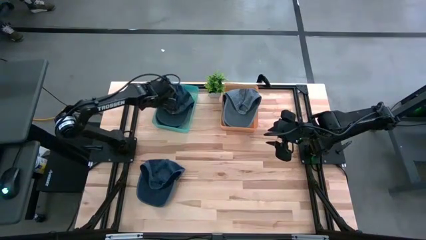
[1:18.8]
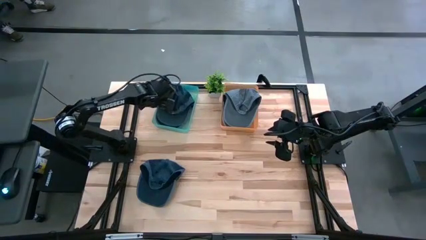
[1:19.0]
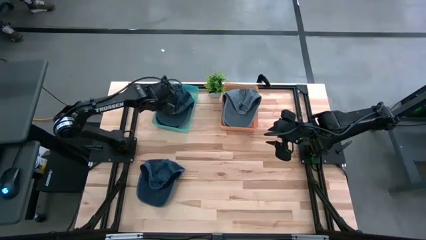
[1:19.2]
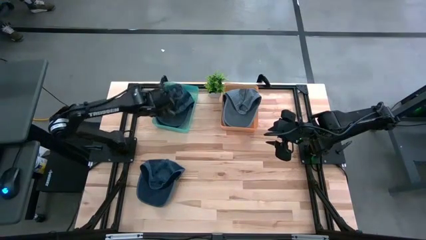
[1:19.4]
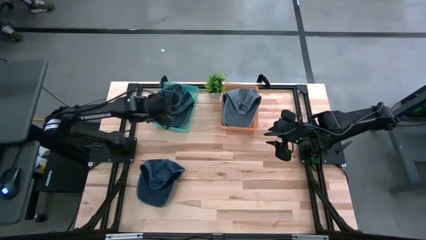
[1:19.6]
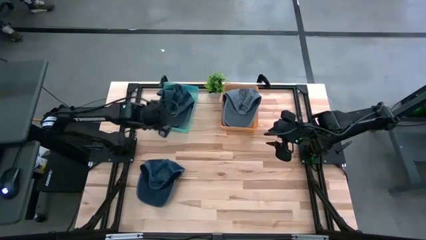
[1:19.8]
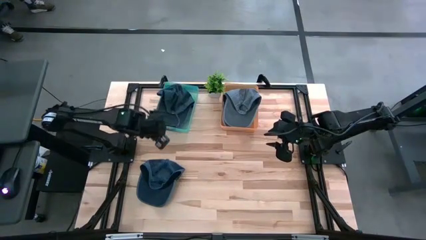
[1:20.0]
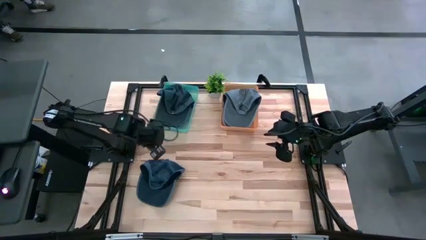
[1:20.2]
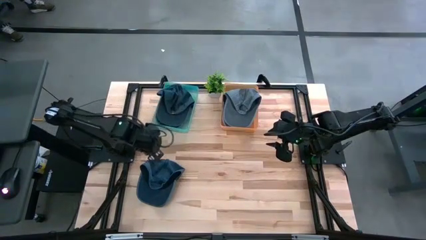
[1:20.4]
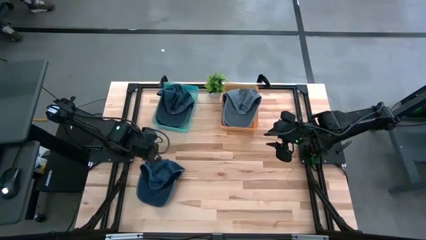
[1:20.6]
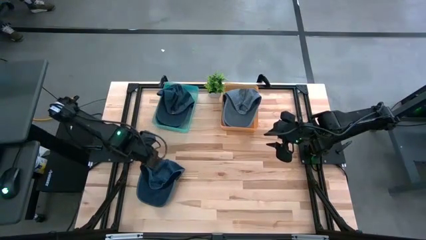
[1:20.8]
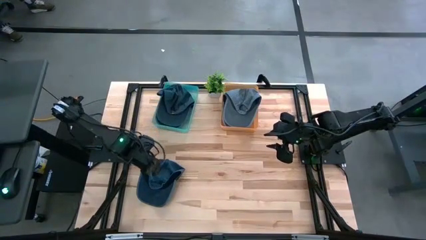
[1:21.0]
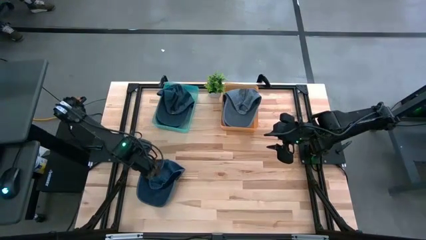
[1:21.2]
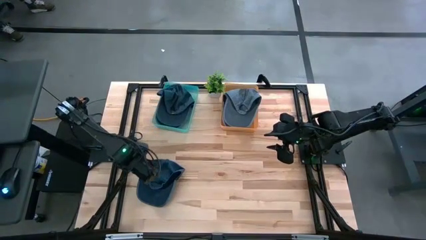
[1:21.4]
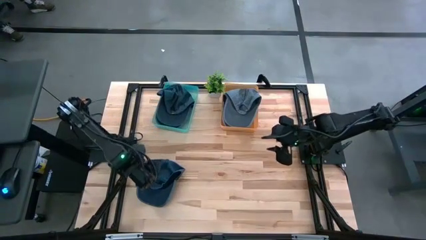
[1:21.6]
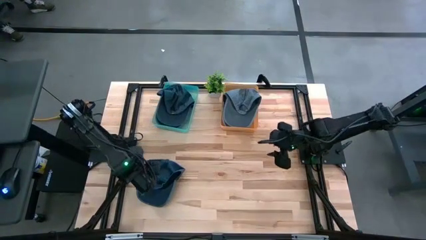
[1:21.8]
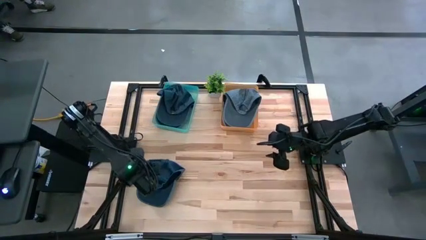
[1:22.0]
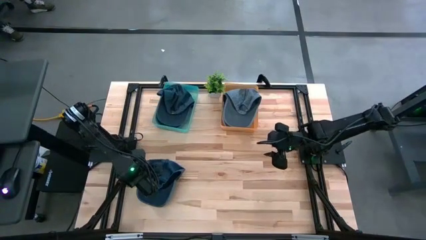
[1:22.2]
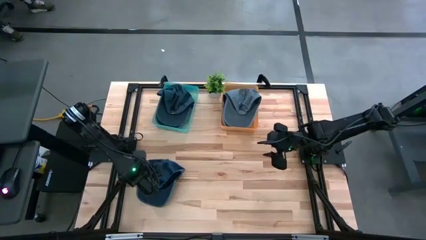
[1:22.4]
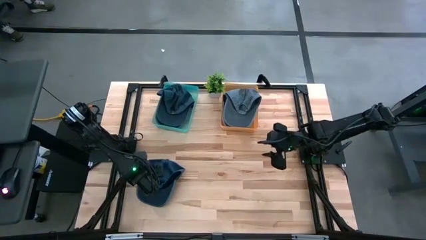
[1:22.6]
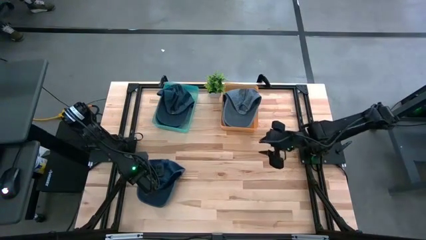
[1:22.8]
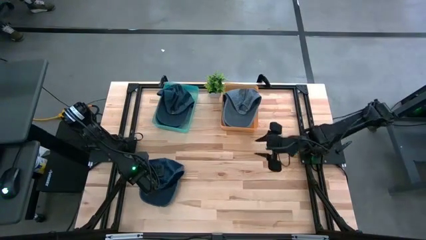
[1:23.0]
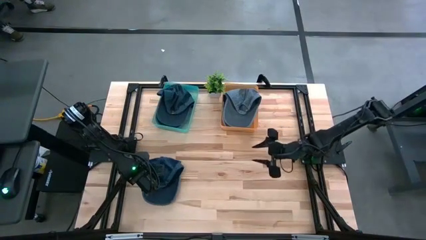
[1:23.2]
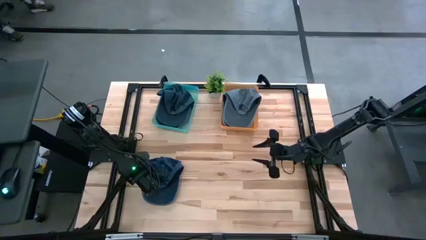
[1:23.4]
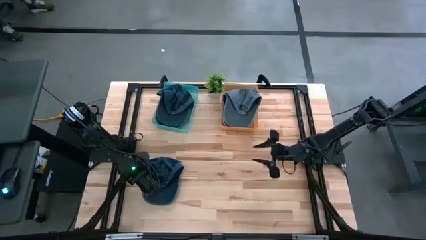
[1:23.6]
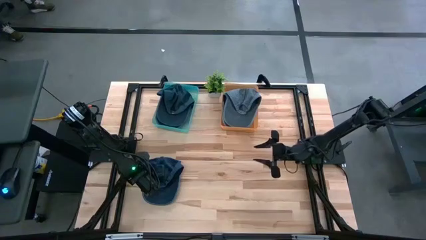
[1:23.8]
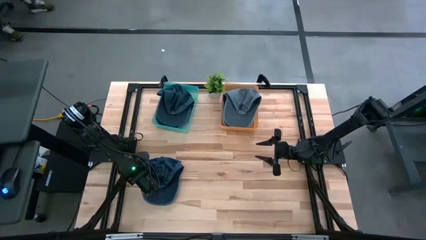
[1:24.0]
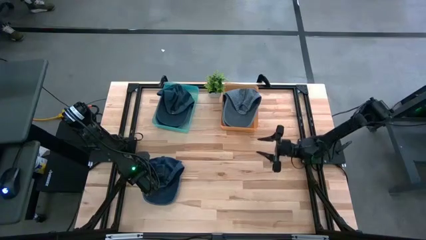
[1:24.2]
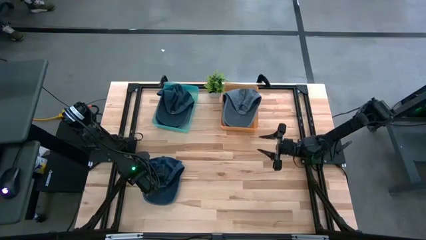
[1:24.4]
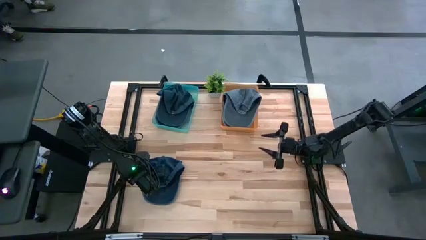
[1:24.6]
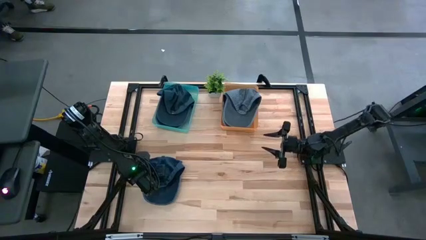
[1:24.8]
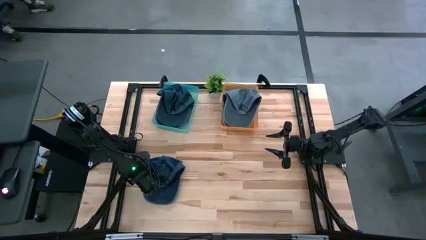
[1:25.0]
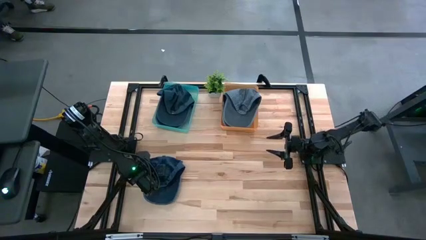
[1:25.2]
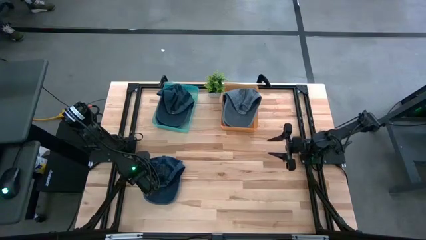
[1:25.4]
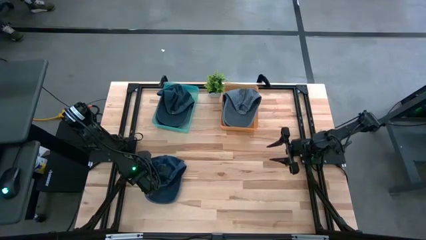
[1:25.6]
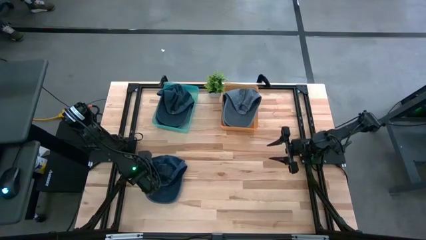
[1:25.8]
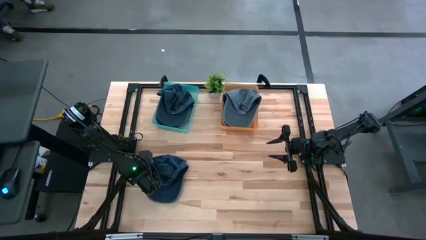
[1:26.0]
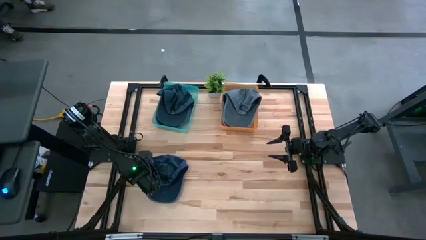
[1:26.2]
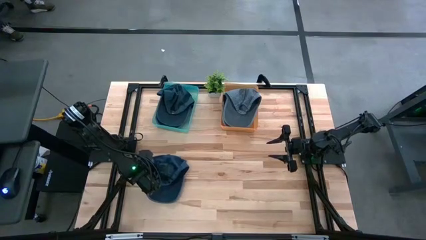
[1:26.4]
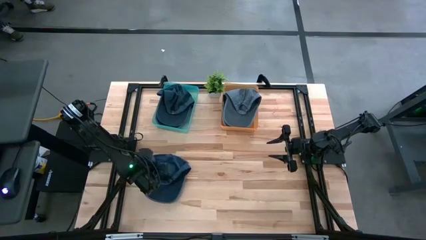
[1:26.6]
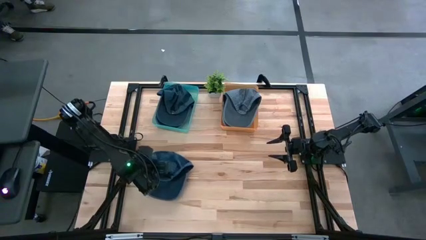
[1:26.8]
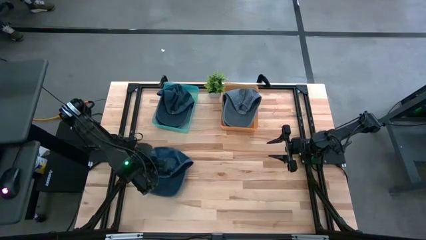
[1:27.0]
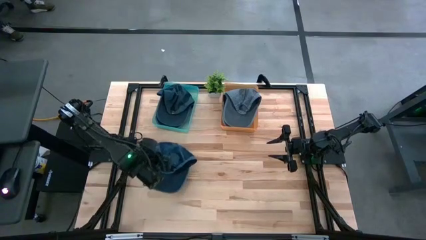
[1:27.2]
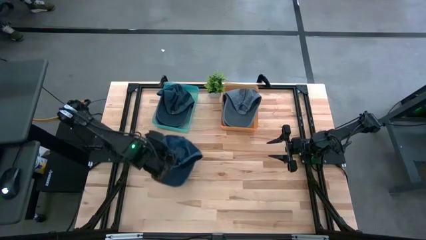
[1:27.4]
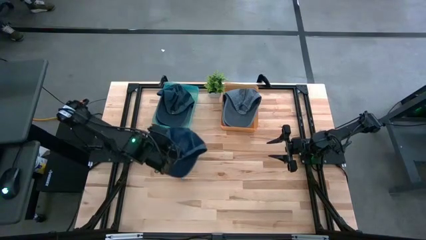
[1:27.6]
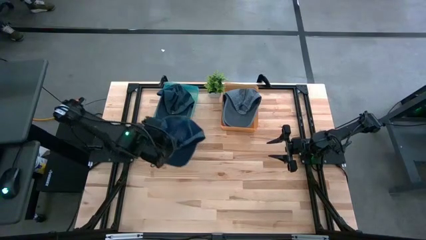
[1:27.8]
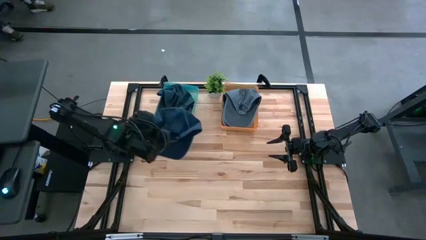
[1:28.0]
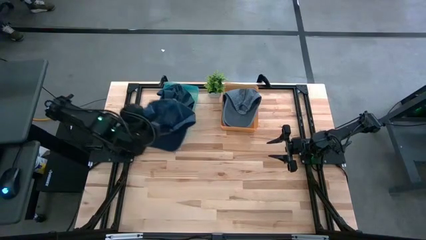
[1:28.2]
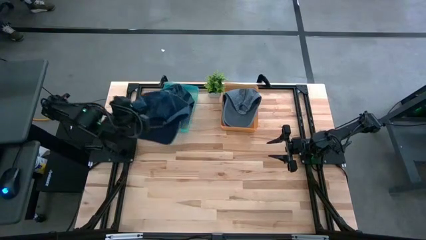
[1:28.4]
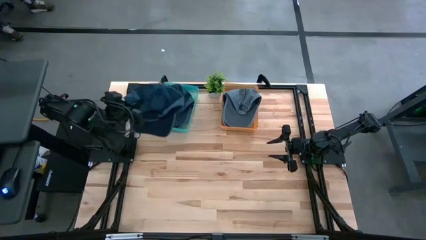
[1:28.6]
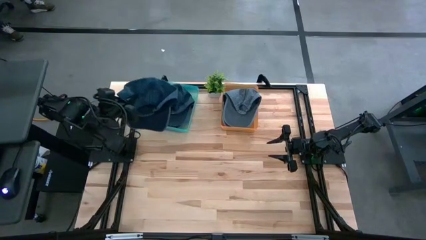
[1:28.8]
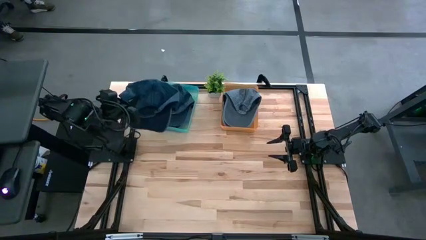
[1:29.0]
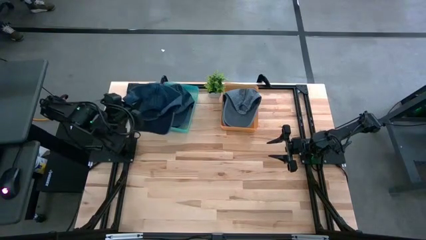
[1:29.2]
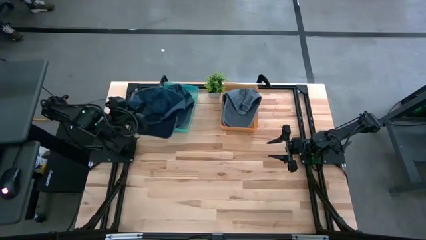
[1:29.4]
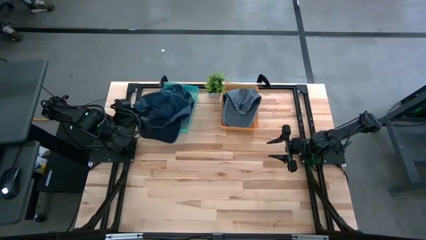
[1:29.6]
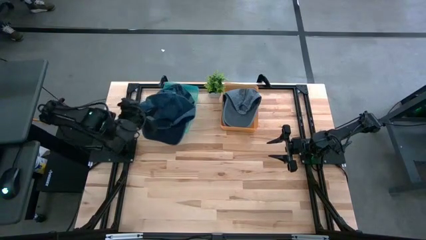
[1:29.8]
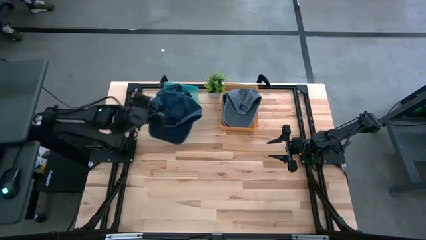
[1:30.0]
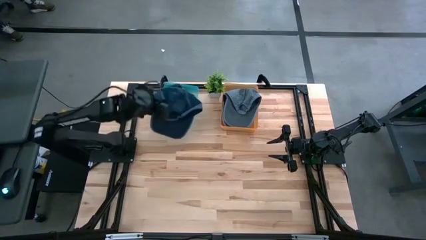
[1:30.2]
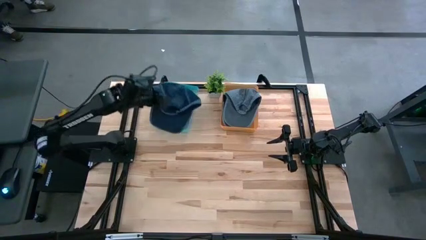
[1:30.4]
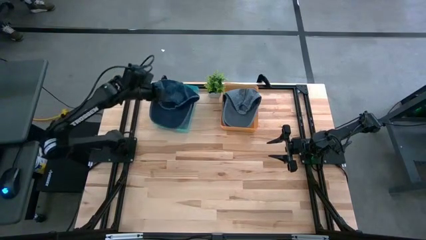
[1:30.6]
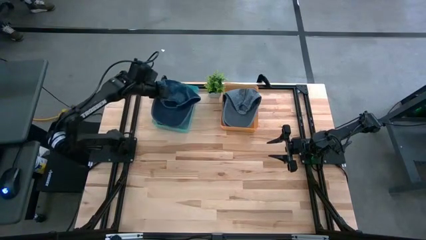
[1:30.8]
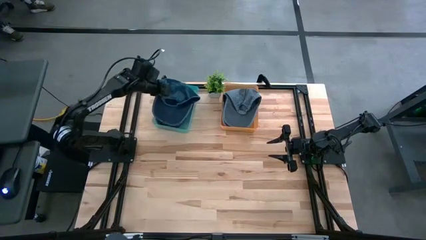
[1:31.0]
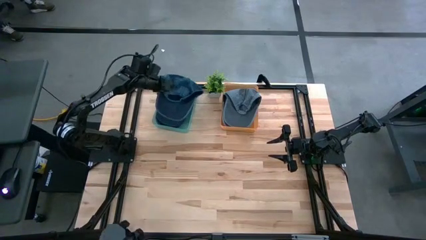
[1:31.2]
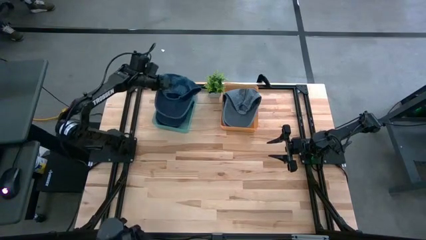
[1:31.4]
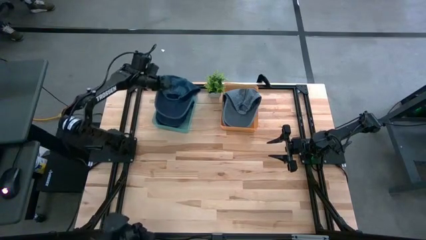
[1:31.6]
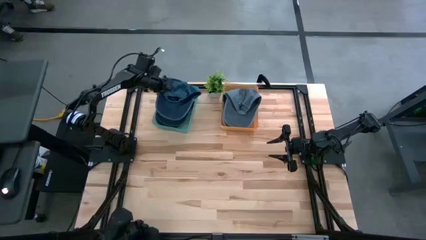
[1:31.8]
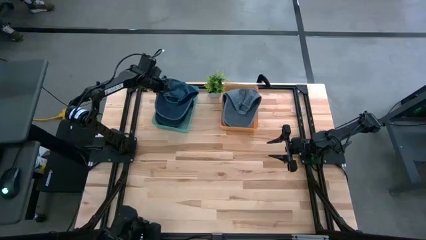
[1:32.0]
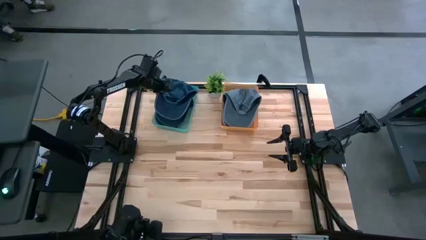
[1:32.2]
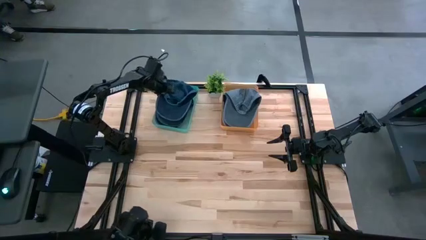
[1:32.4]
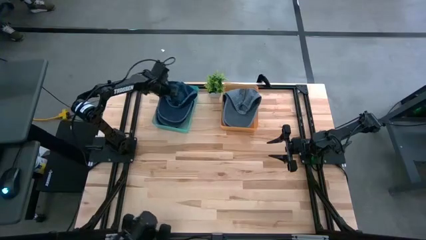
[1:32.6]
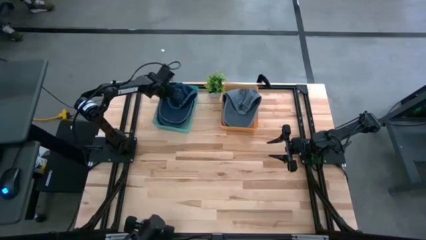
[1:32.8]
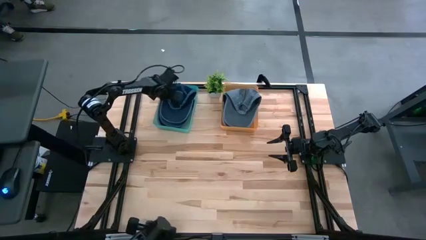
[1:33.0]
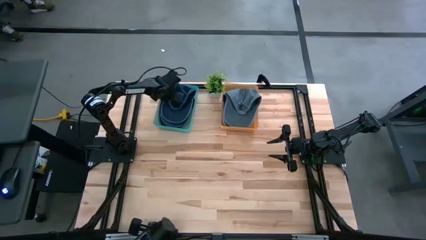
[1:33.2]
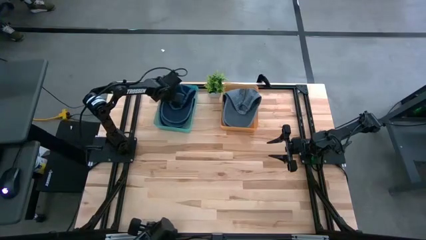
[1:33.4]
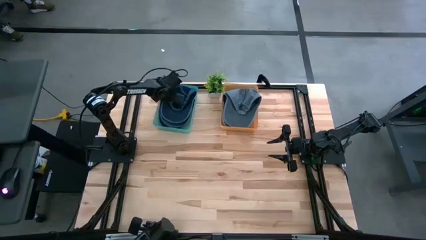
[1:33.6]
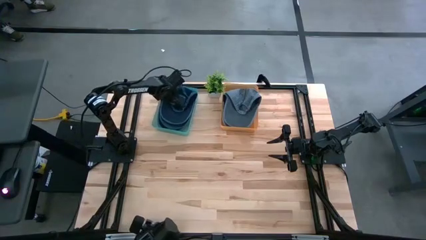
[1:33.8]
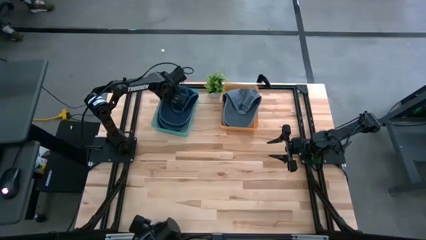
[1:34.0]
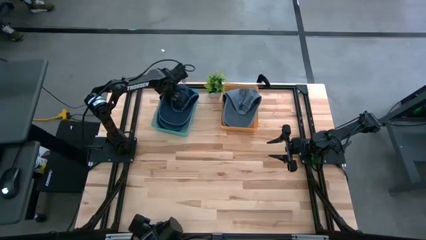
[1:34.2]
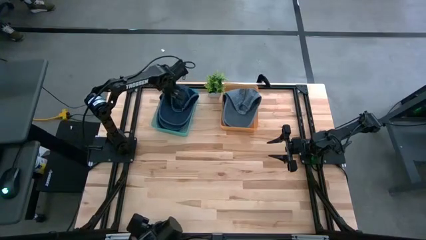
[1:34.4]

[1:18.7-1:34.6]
Task: Pick & Place hat
Put the dark gray cap into the green bin
